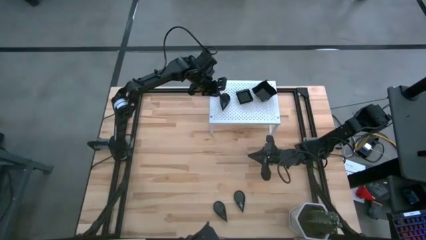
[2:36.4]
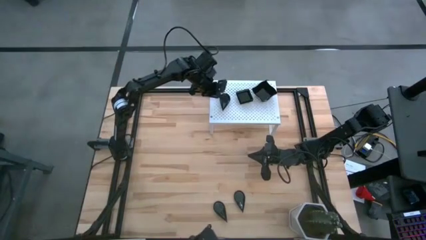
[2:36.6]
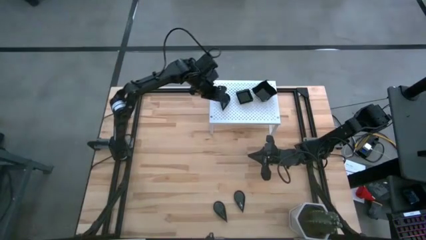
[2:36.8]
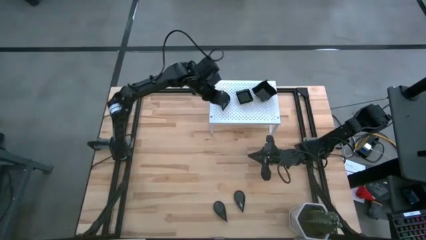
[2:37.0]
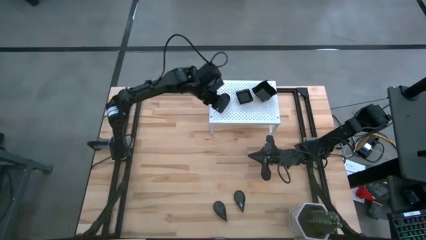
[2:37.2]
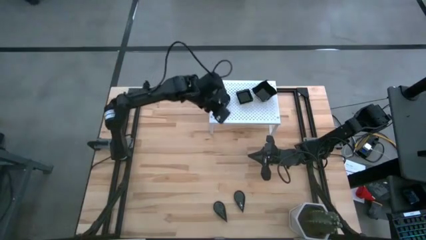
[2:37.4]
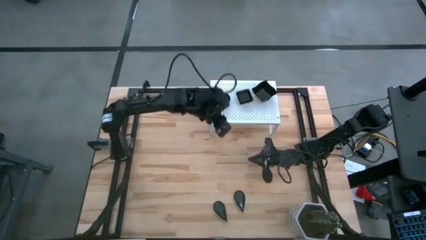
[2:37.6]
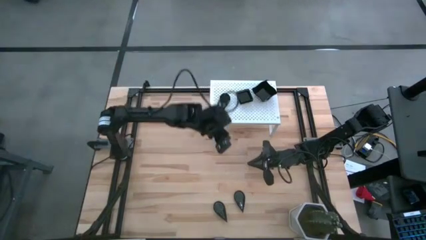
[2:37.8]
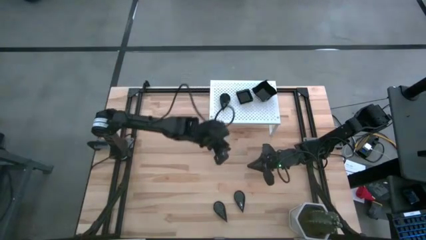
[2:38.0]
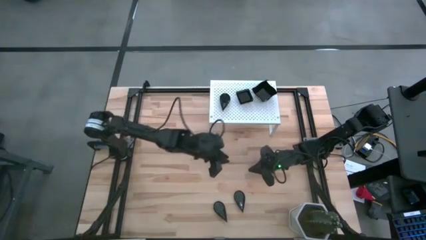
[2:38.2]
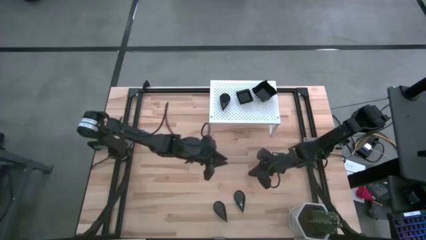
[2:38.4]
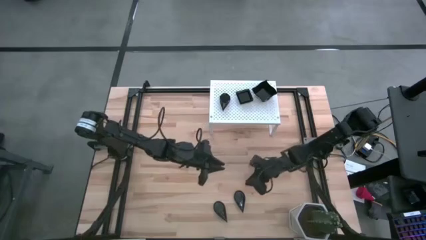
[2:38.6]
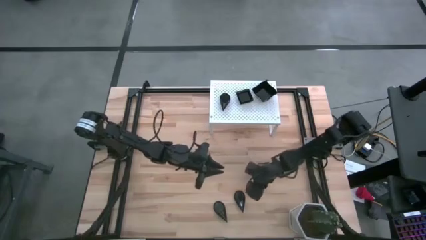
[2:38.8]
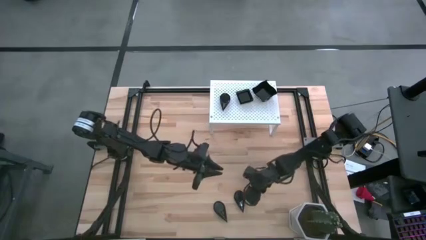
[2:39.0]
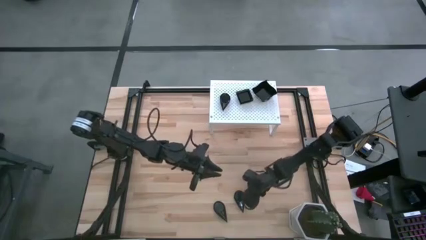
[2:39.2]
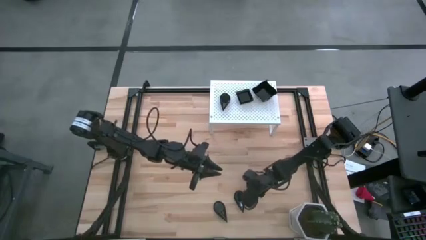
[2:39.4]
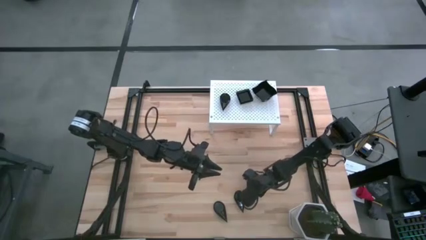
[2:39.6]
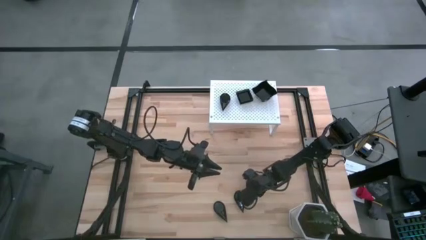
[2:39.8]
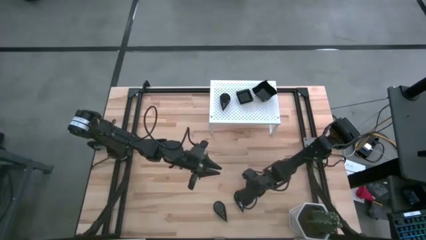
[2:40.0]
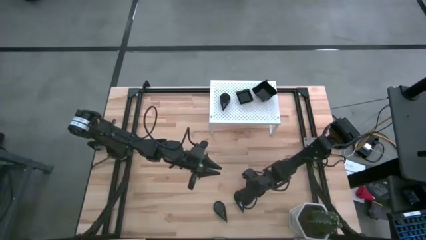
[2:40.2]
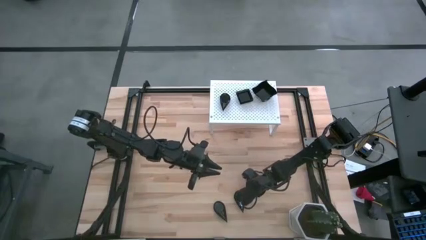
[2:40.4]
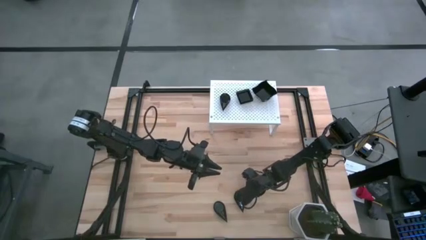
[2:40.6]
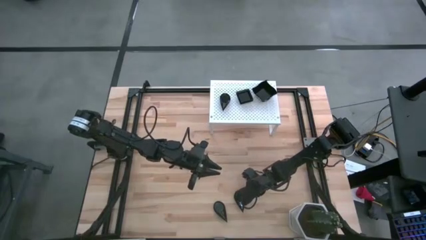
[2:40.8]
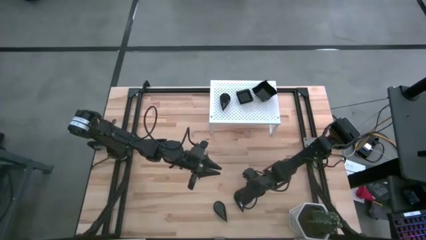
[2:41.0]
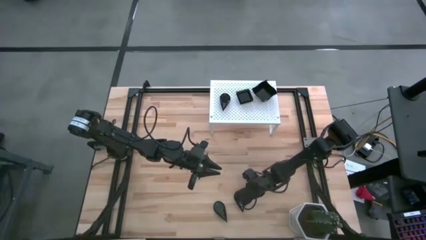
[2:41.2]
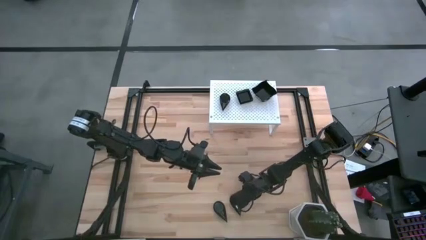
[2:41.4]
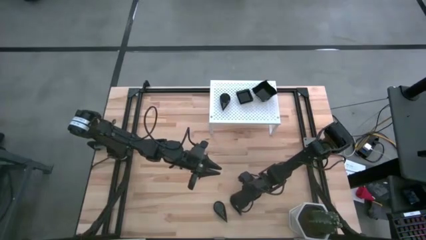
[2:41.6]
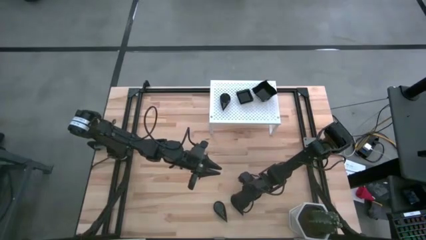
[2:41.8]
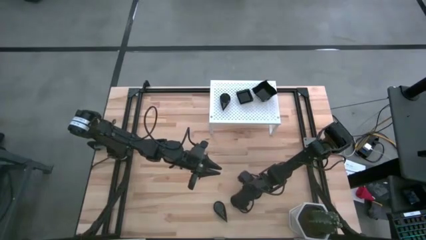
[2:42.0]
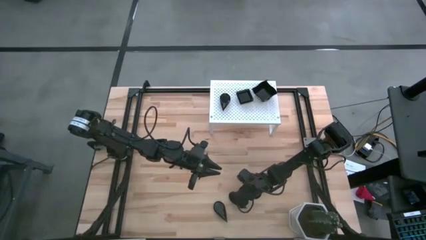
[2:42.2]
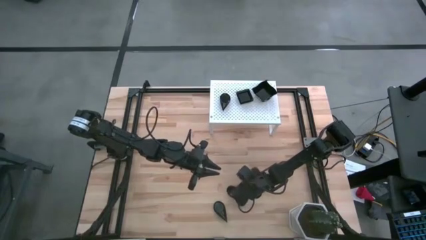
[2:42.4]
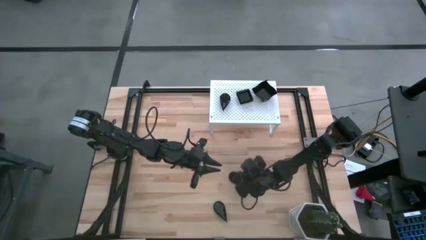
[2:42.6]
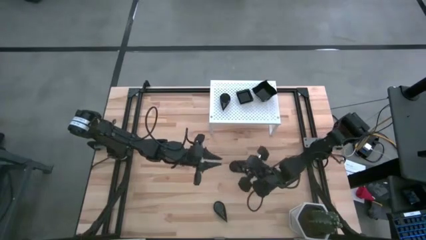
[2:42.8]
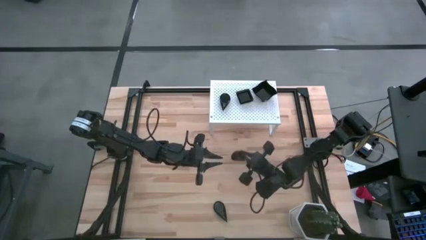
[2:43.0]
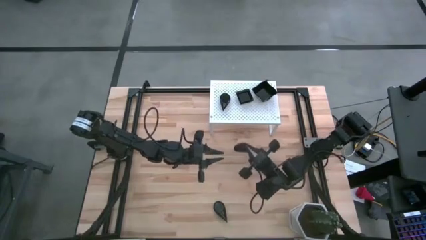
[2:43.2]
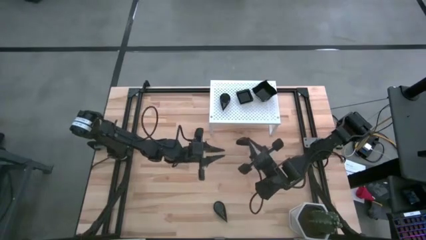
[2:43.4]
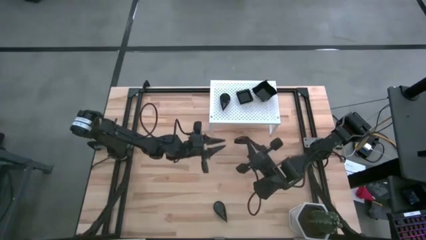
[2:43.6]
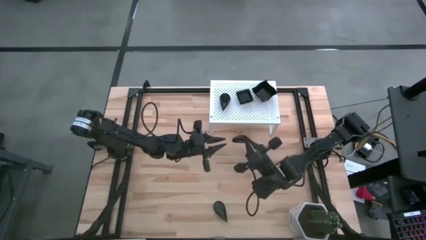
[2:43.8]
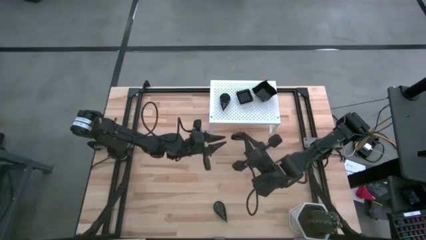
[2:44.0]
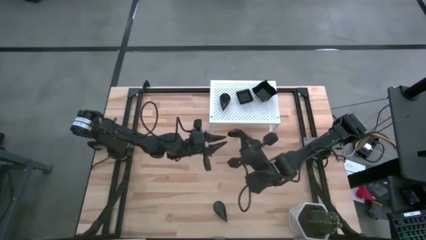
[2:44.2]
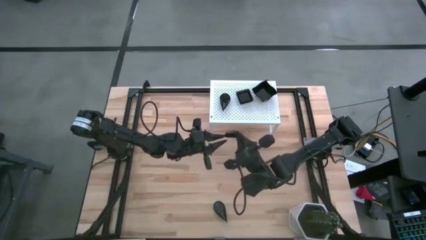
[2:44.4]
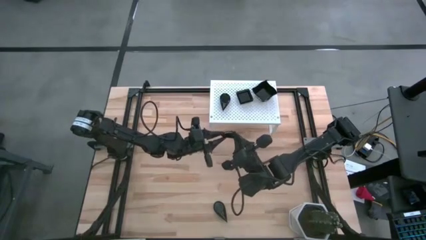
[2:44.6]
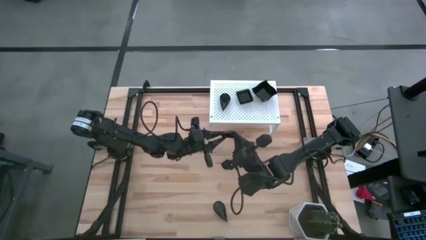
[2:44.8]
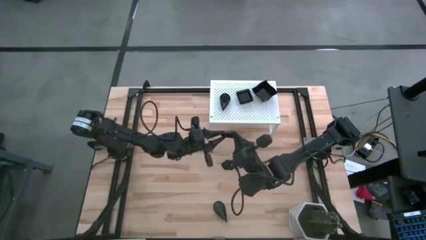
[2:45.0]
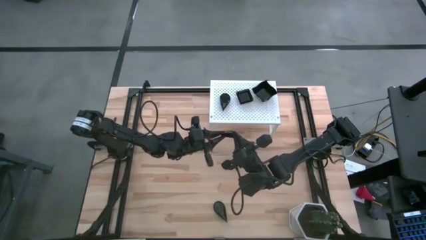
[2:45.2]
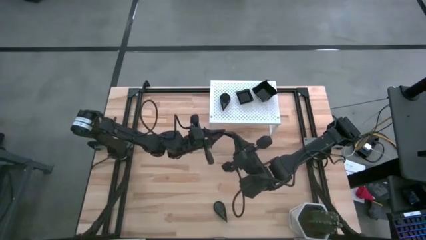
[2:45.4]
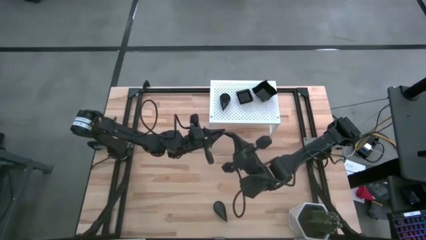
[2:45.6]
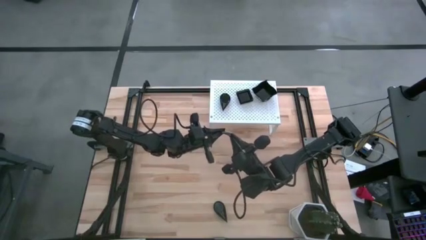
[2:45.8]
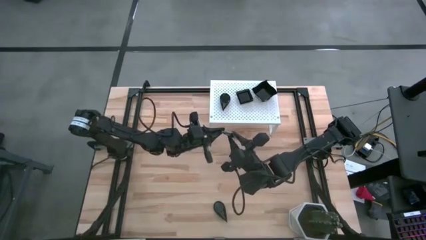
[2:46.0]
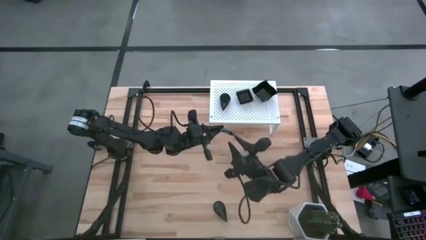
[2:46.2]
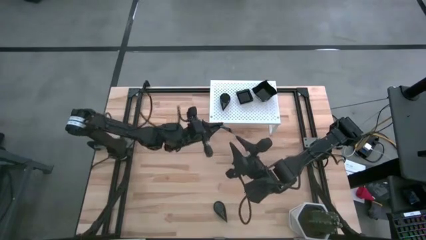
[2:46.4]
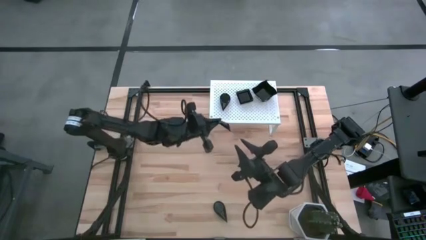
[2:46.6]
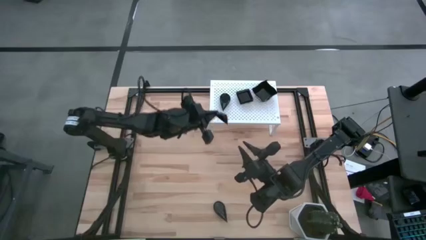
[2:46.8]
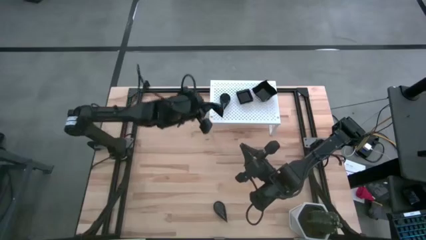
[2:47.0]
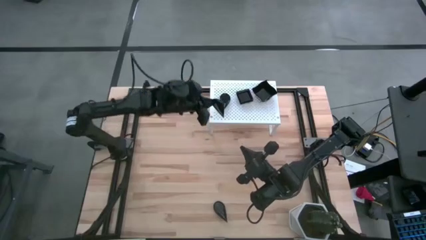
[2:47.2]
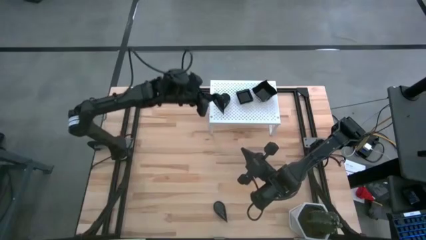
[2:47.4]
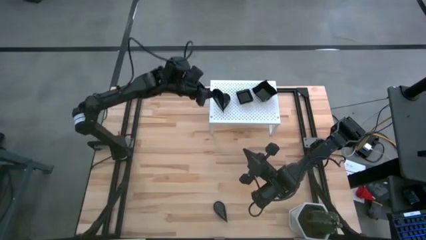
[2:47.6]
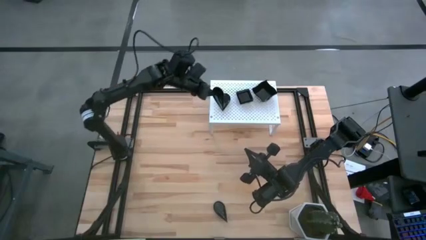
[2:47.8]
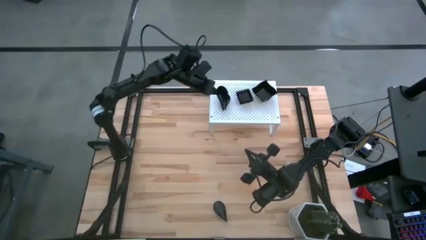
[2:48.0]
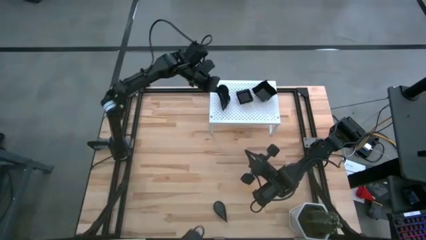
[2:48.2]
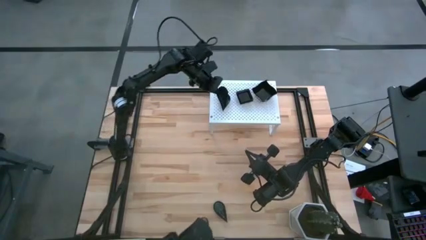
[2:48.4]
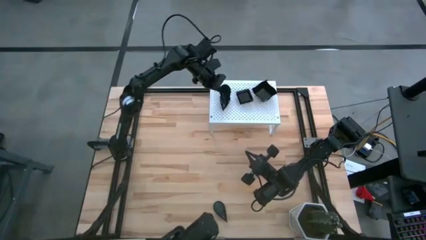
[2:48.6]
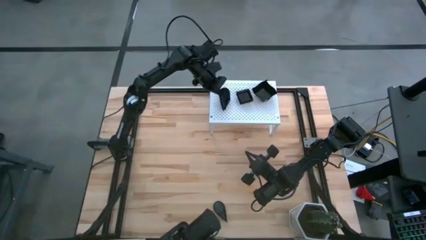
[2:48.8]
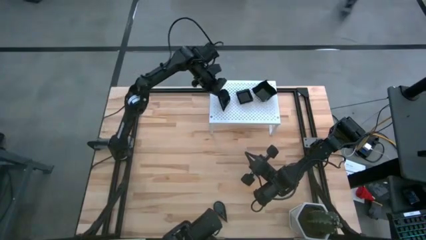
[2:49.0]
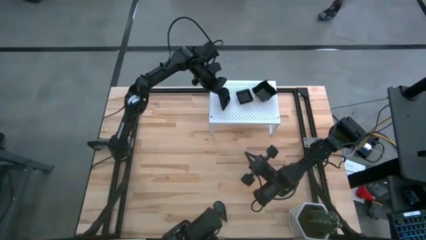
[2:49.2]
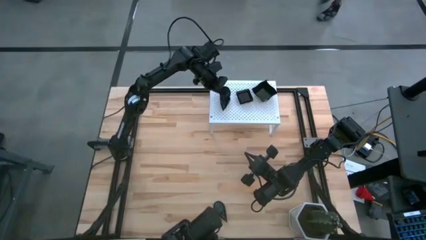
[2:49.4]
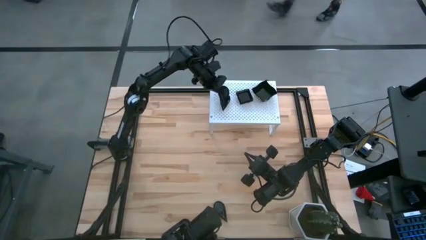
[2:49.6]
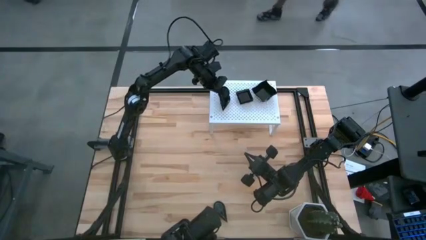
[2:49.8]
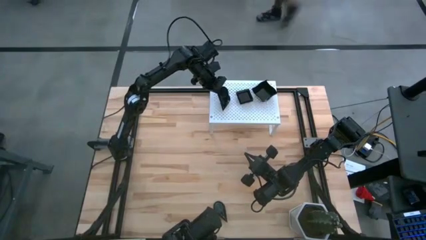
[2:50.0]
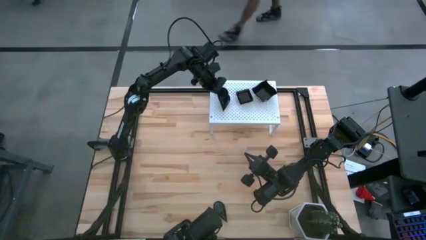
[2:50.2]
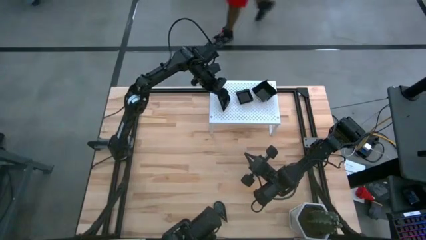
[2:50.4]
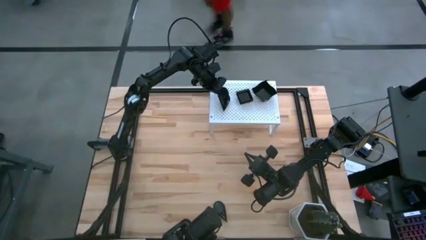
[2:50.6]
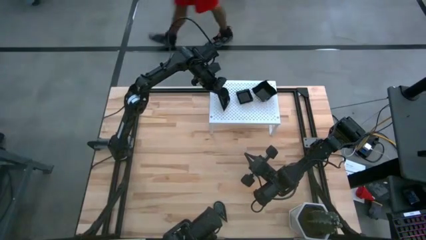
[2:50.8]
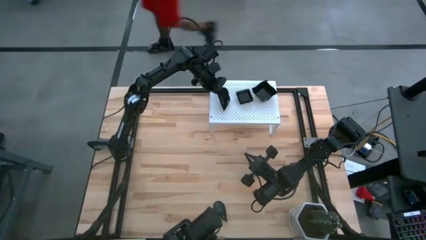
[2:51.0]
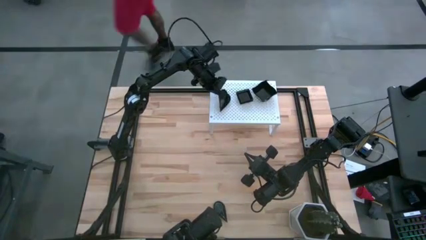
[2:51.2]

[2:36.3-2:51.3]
Task: Pick & Place Mini shaped plates
Stack the drop shaped plate on top of the drop shaped plate on the shelf
